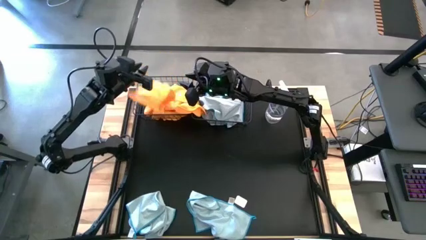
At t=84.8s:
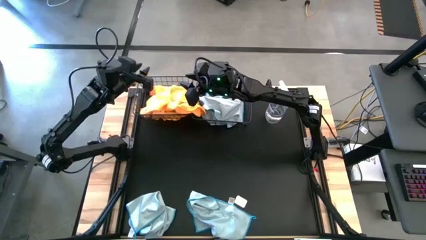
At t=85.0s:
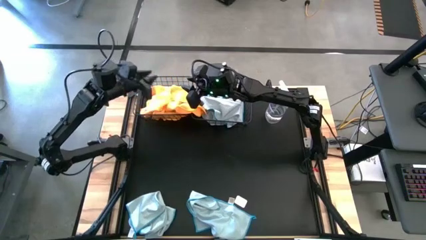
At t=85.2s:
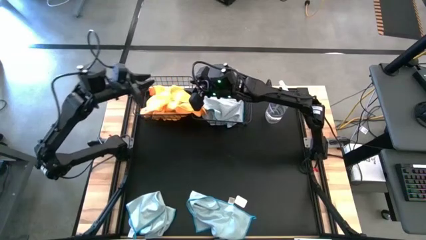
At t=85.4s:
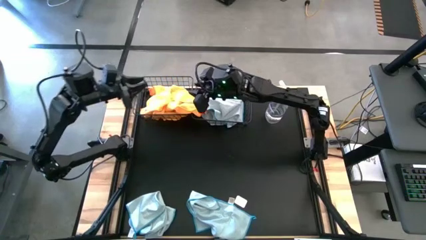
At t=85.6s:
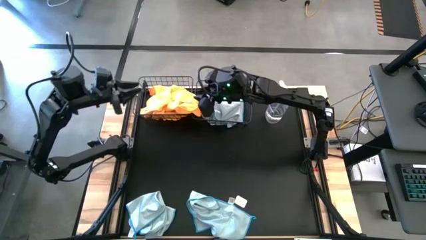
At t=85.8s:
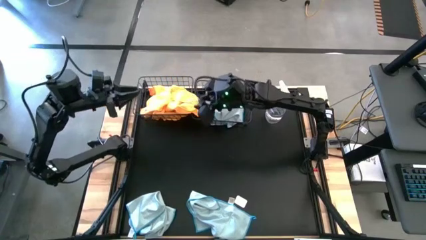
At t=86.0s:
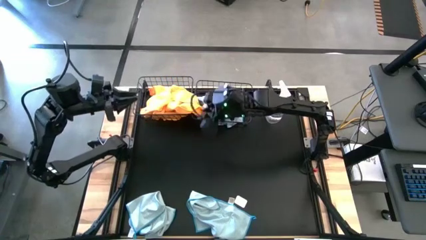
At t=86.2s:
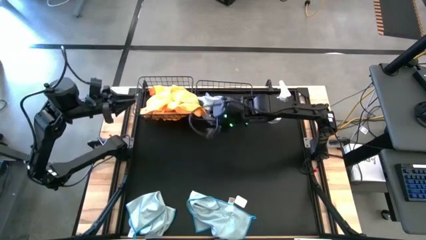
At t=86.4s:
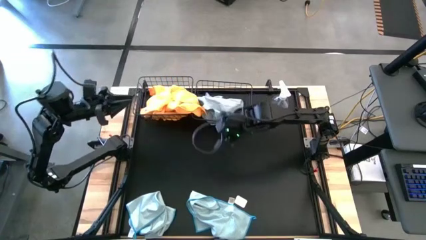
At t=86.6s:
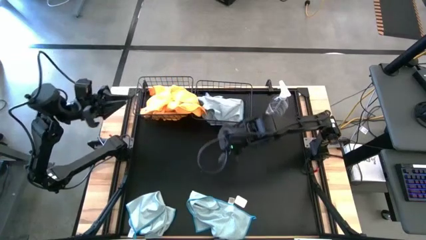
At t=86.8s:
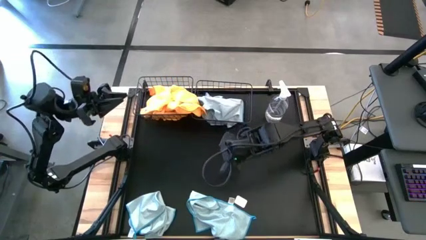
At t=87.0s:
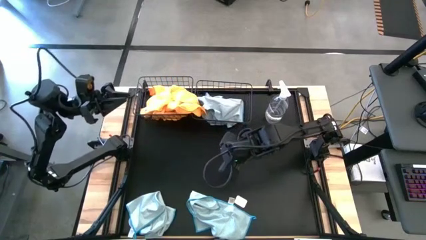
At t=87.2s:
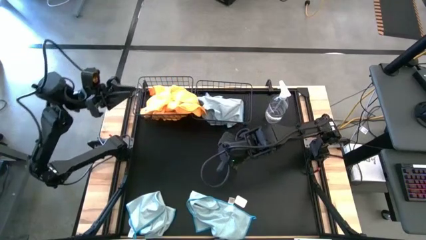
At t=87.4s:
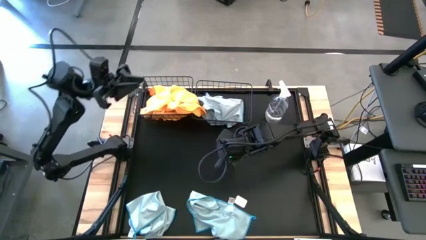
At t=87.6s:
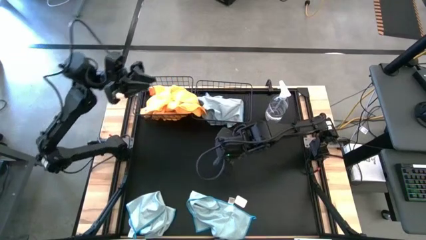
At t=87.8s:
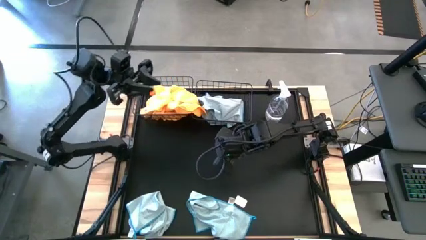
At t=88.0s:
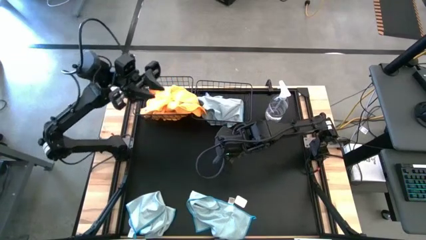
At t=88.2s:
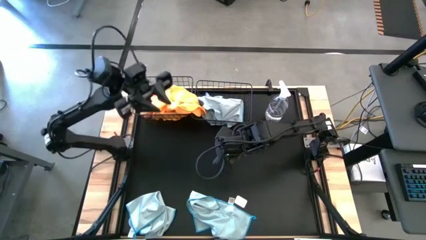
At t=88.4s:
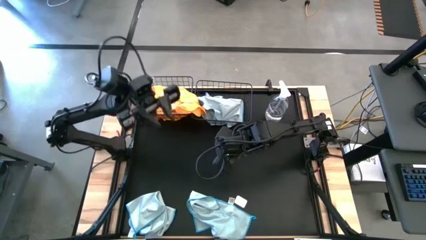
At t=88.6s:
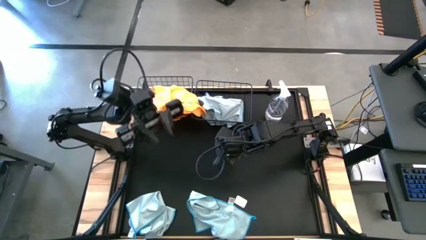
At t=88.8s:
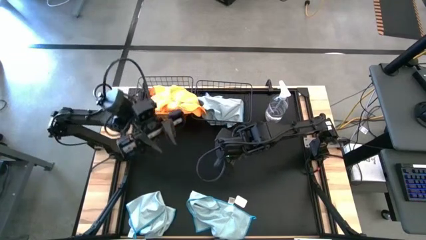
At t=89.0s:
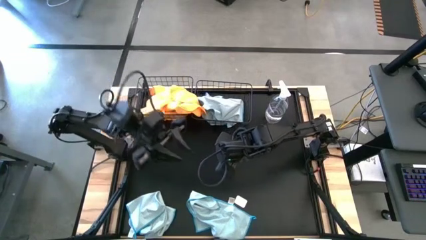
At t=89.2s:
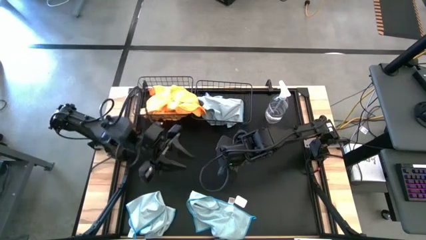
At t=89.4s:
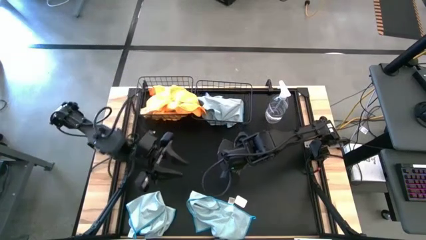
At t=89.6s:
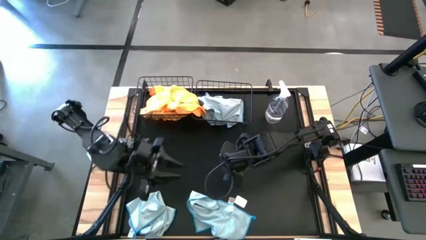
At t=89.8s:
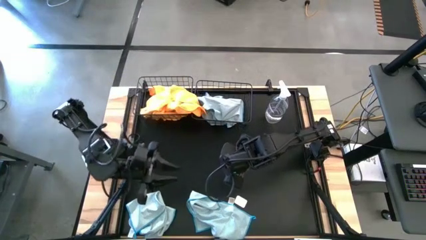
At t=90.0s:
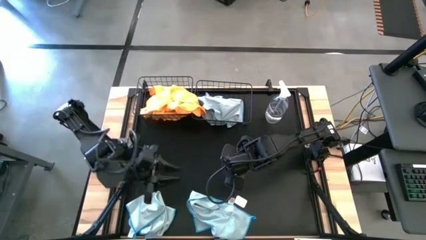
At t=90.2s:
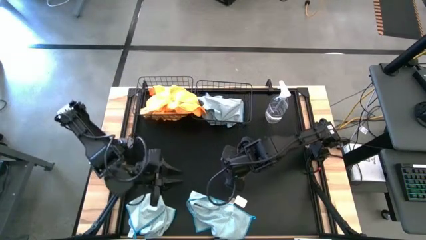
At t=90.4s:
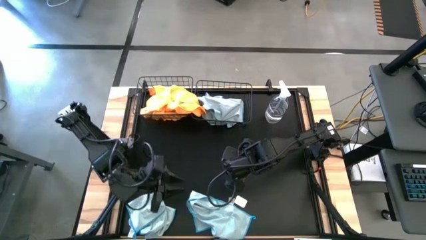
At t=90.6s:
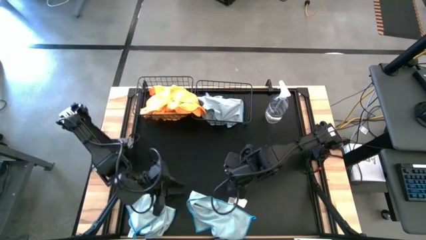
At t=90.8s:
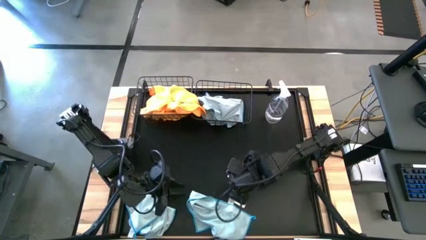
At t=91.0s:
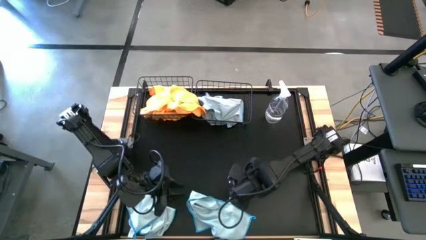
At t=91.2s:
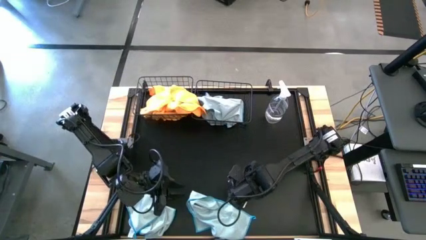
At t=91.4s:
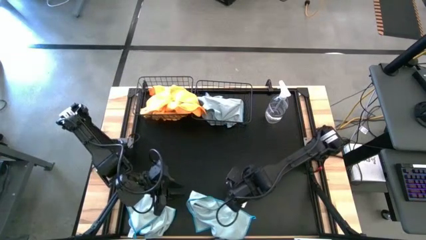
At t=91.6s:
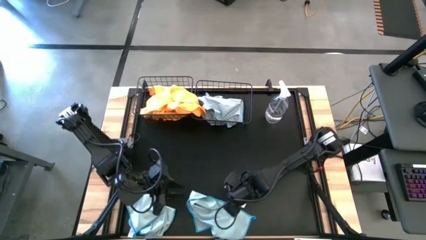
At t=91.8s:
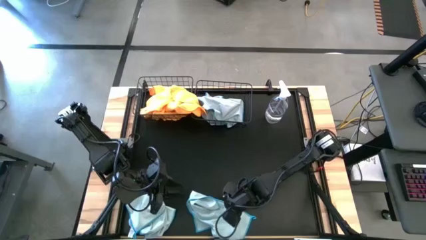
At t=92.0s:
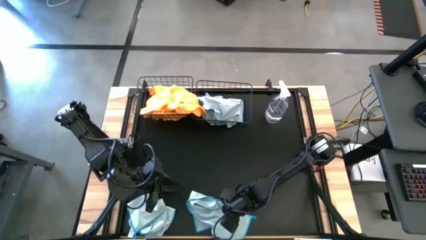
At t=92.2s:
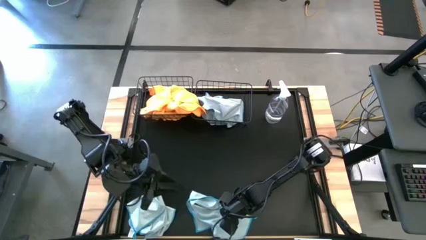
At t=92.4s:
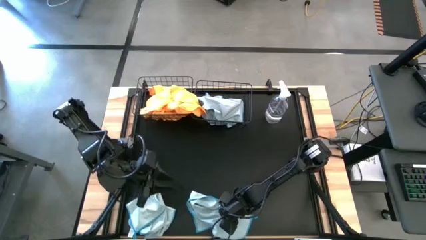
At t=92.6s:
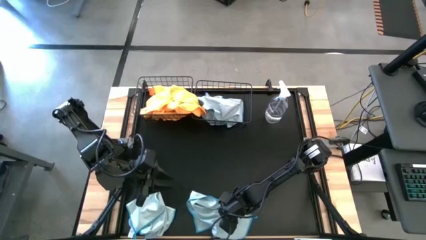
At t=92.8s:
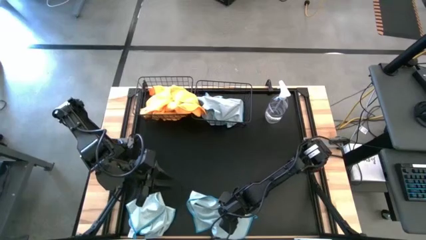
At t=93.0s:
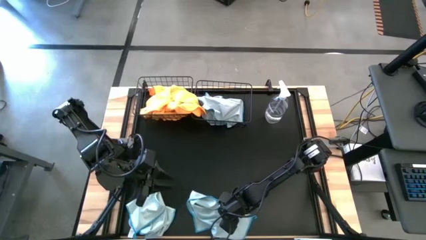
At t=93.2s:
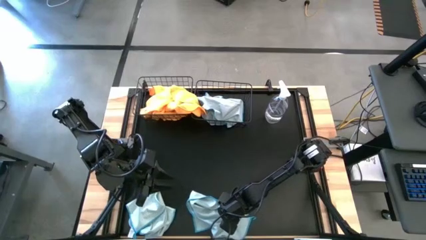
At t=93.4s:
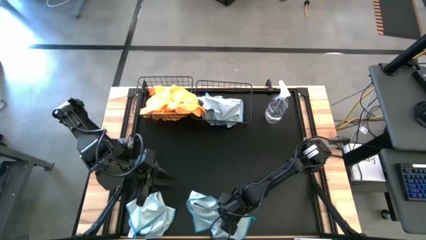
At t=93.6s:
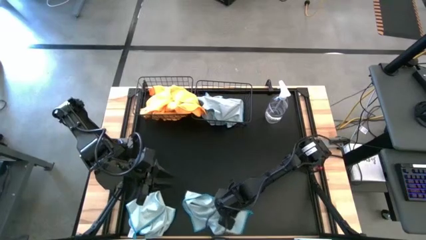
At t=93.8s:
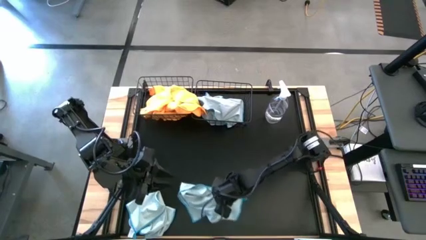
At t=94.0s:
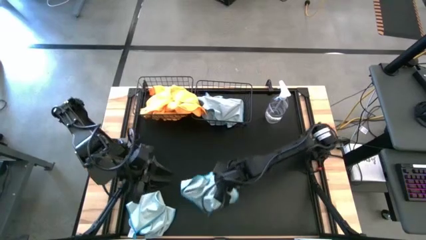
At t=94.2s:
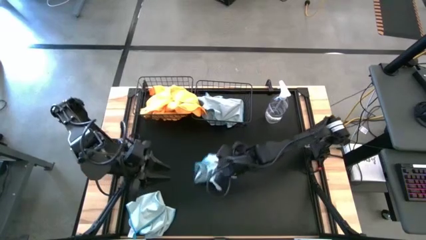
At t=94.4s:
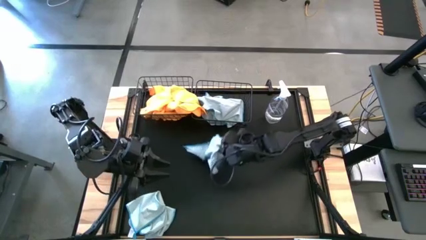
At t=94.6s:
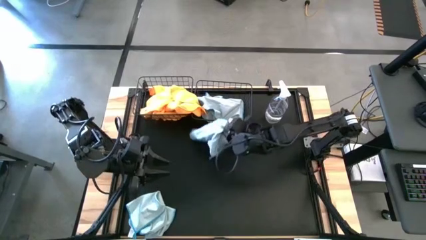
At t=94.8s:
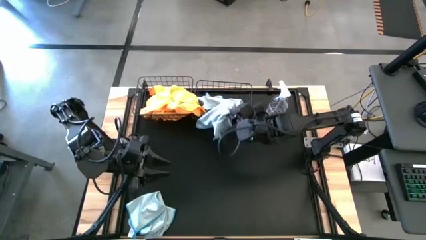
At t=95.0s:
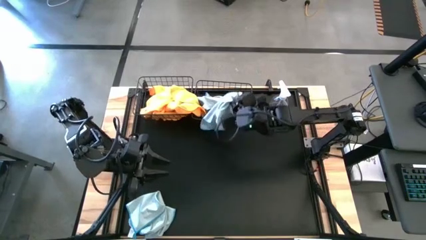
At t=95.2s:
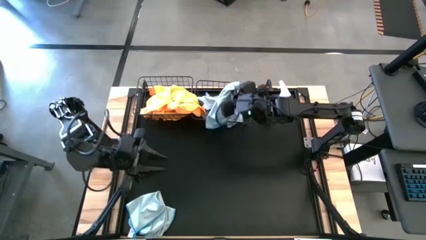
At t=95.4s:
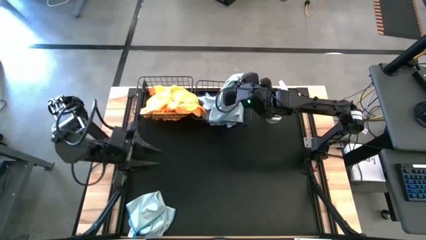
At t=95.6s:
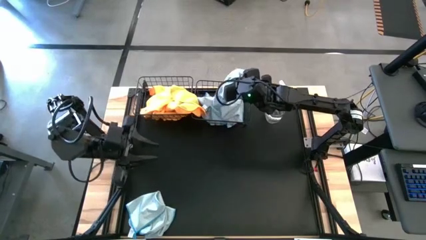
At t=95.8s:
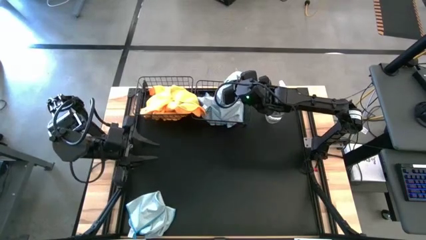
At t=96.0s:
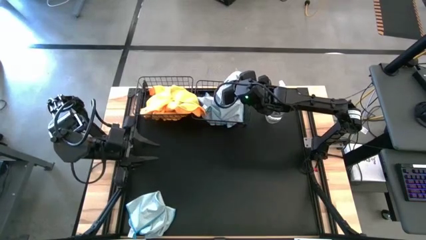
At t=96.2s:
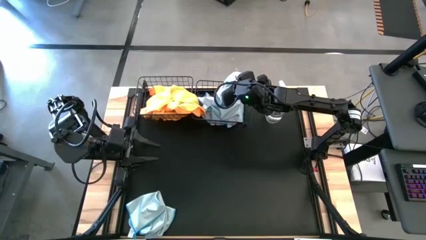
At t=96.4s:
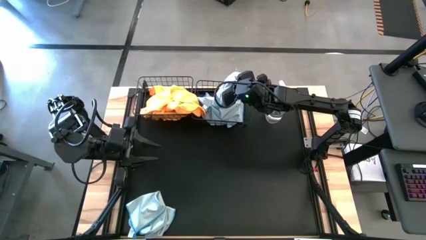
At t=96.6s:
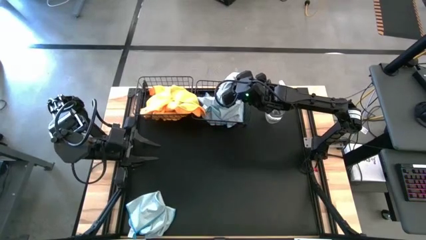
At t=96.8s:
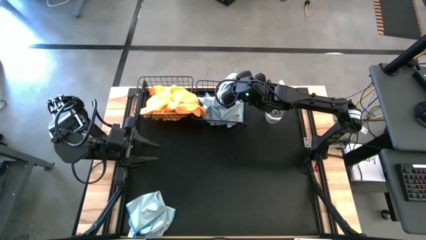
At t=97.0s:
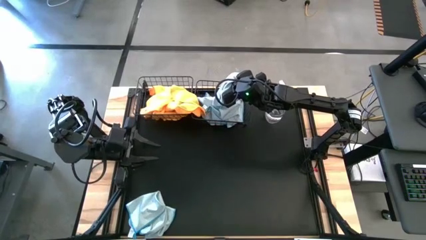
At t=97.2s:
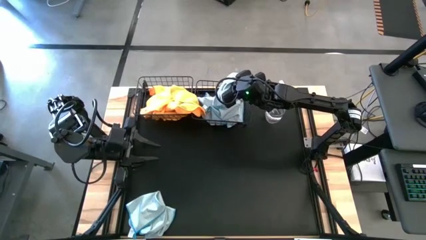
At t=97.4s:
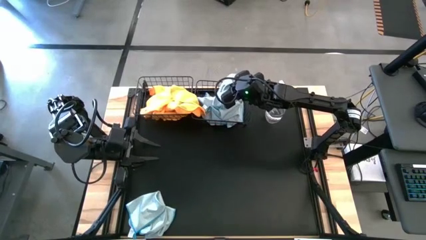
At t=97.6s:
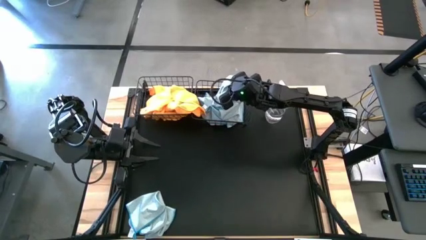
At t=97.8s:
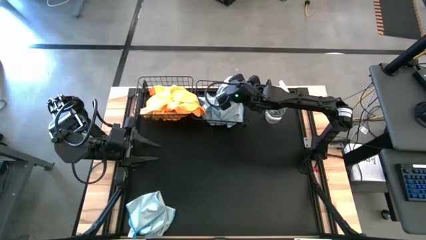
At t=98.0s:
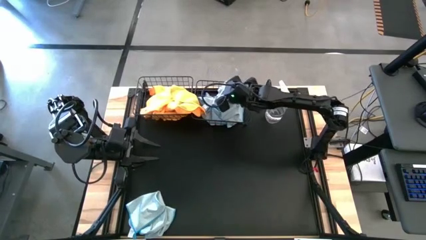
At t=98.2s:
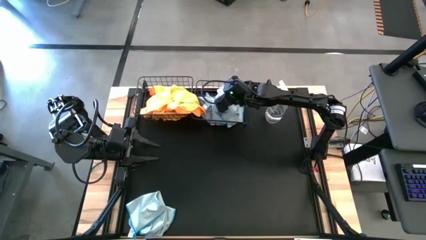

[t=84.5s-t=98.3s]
Task: Sort microfiber towel by color & place in baskets
Put the blue microfiber cloth into the right black wire basket
